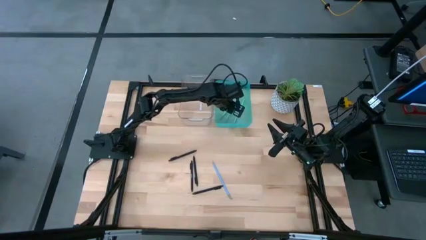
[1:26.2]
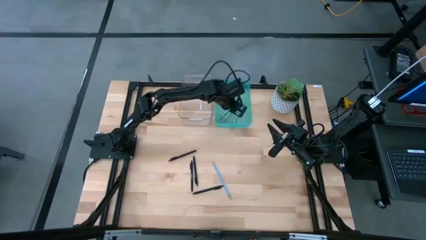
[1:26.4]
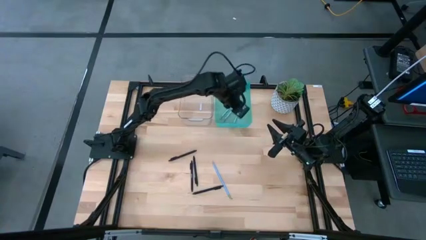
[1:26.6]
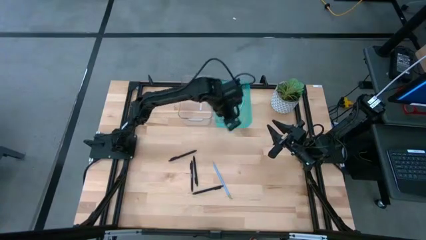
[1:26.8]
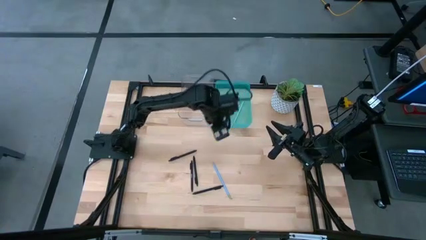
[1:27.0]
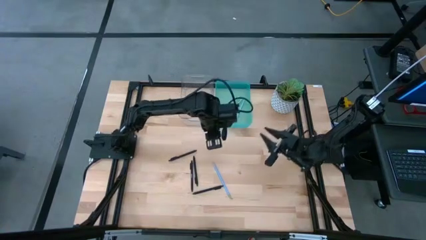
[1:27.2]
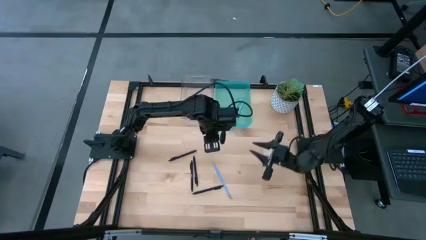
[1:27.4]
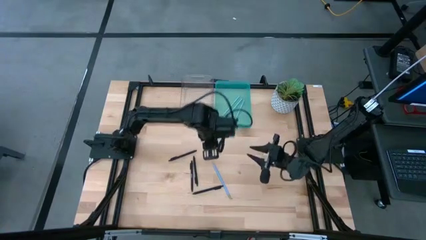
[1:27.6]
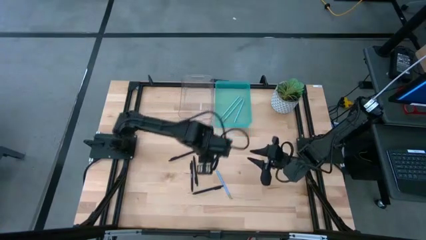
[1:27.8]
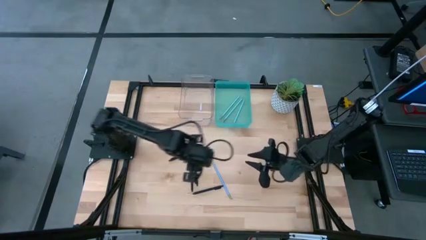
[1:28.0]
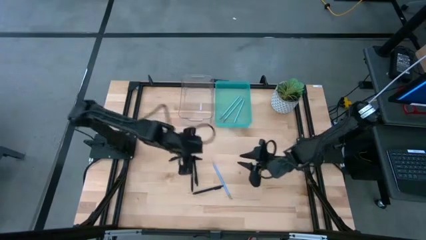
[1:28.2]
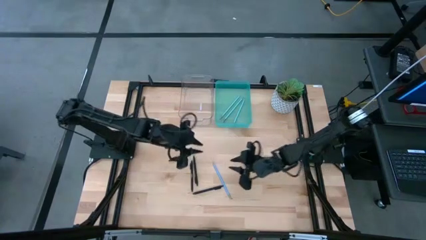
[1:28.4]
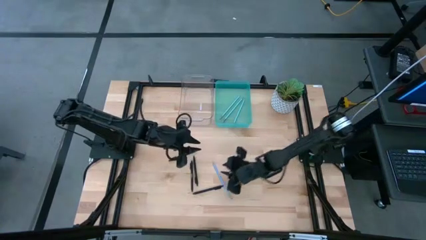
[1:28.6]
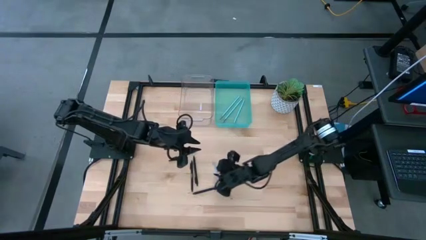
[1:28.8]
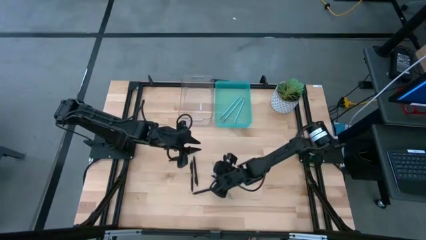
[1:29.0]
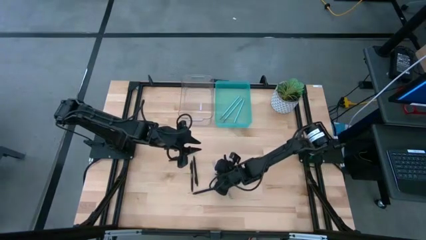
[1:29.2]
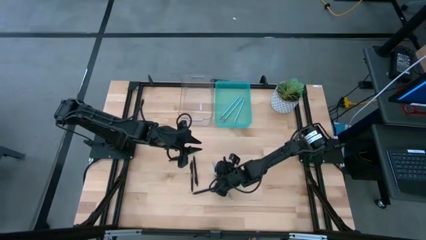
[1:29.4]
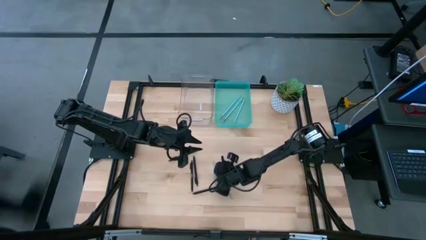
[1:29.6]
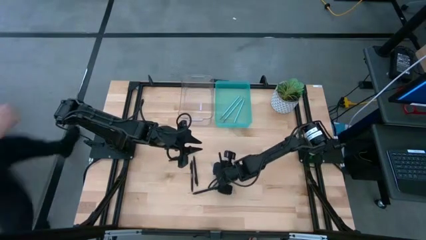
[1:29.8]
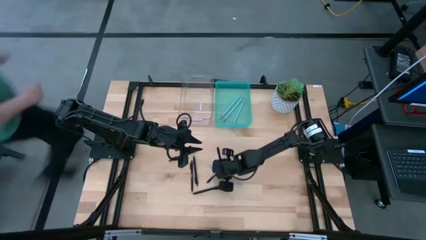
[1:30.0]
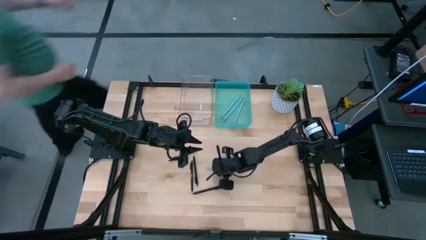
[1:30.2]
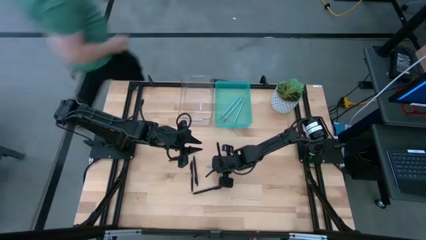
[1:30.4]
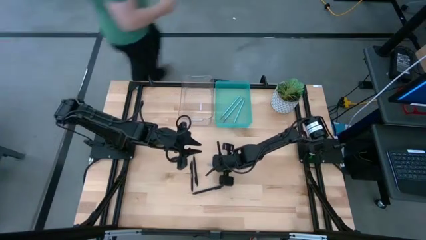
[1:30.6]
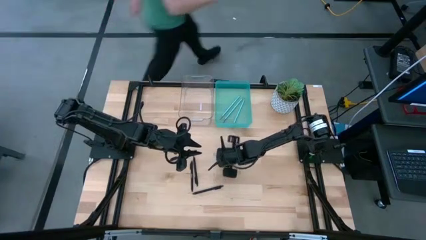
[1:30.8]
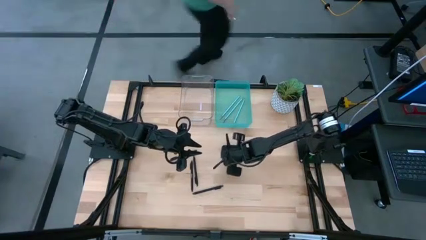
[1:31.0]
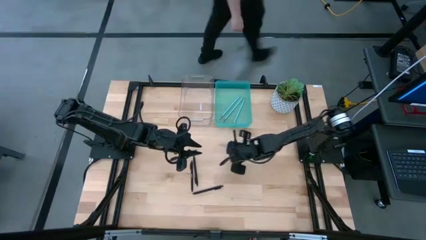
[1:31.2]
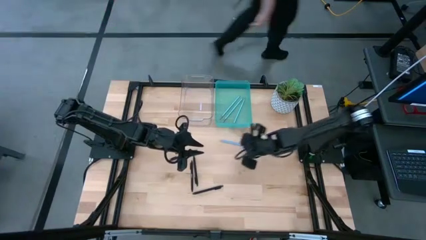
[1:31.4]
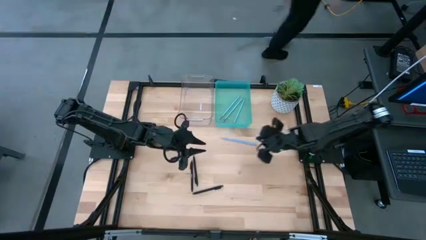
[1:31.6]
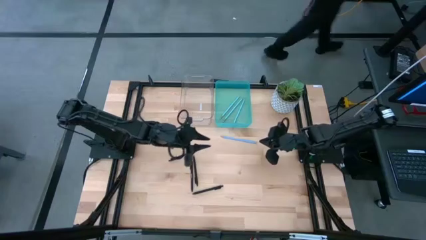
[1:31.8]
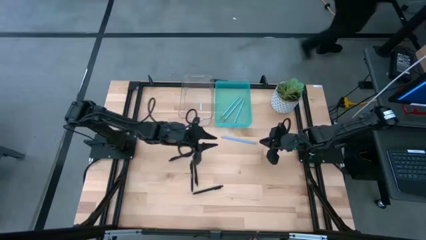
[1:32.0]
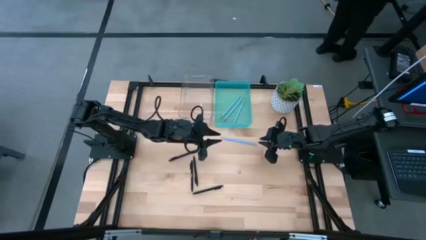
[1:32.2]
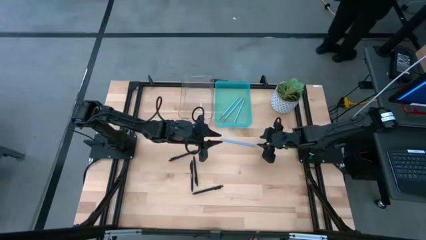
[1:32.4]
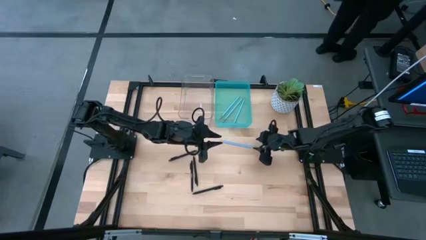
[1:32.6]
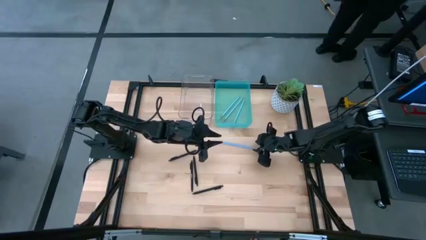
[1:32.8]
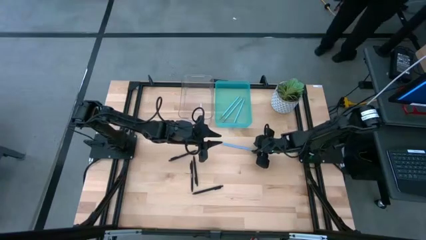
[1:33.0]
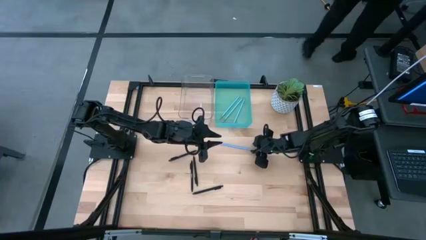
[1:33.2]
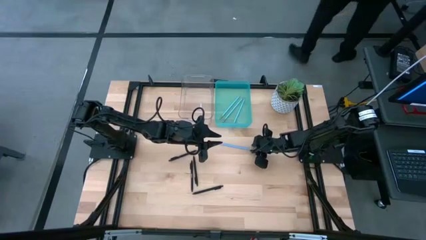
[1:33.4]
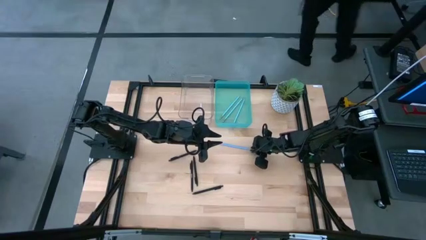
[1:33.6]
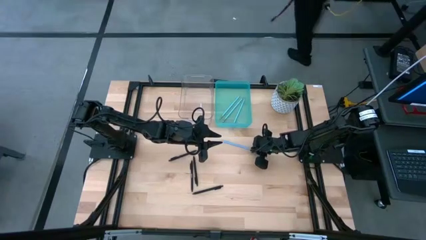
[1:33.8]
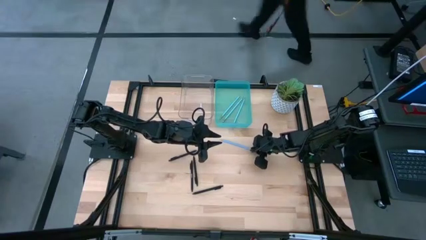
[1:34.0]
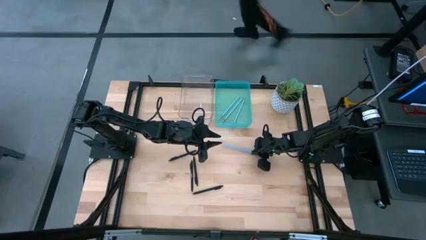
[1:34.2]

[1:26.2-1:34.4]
Task: Sort pens & pencils
Put the blue pencil into the light blue bin

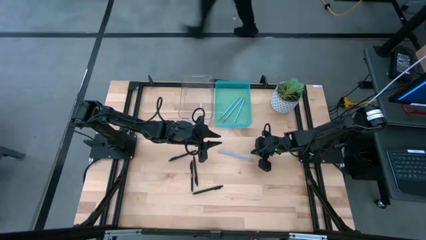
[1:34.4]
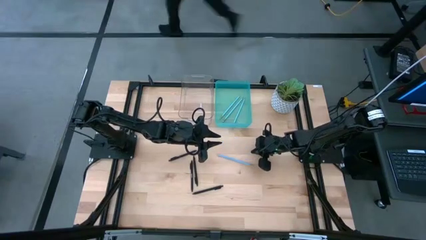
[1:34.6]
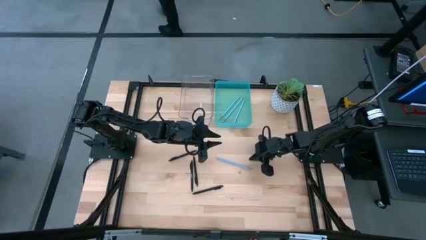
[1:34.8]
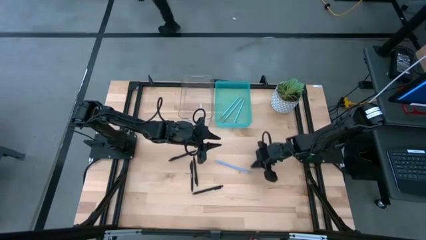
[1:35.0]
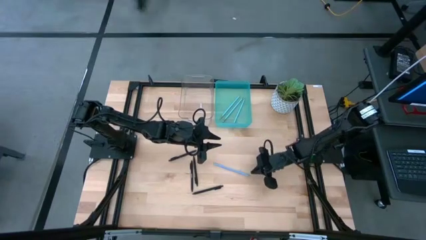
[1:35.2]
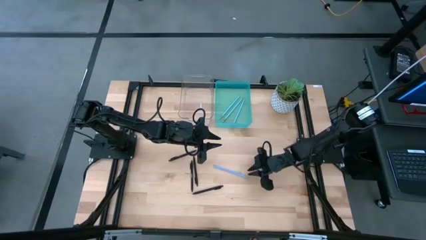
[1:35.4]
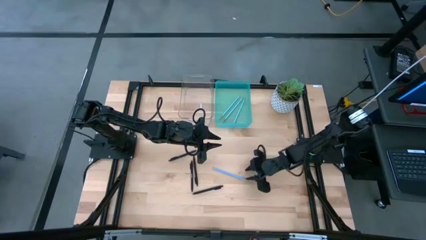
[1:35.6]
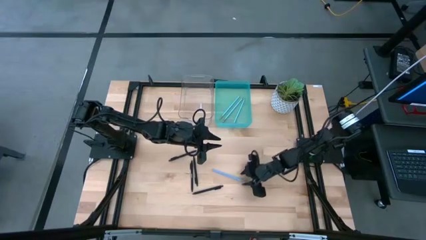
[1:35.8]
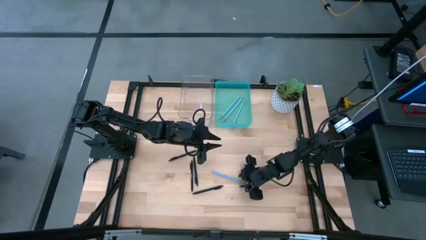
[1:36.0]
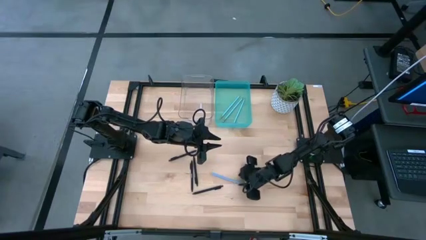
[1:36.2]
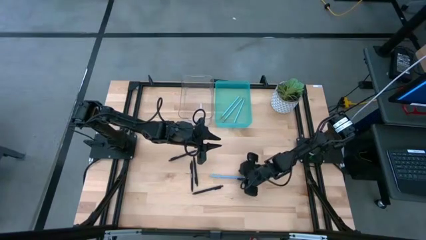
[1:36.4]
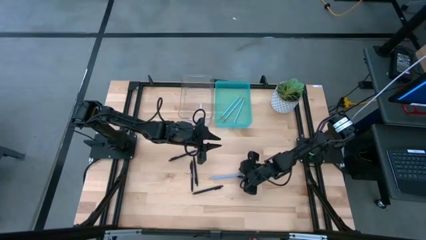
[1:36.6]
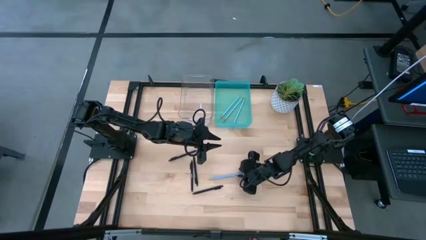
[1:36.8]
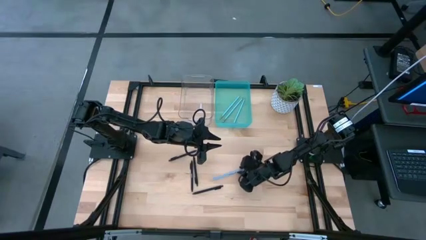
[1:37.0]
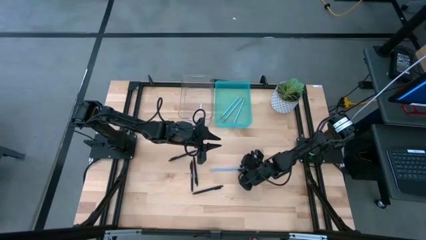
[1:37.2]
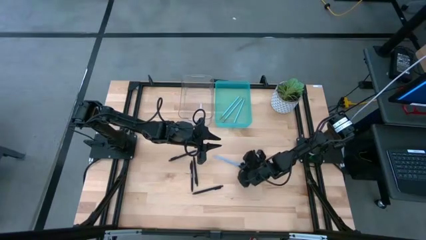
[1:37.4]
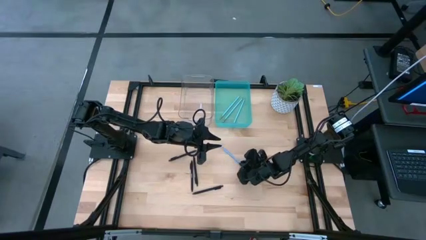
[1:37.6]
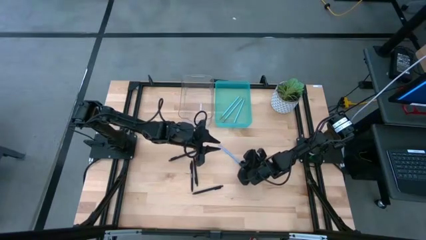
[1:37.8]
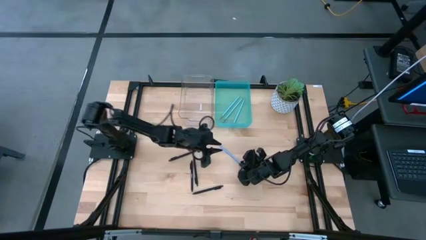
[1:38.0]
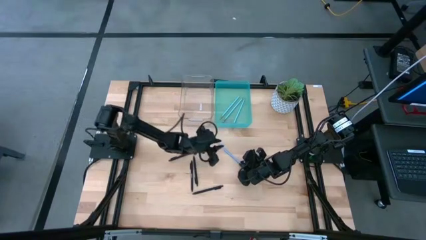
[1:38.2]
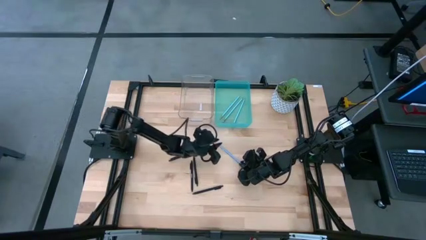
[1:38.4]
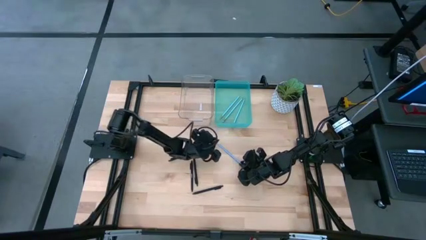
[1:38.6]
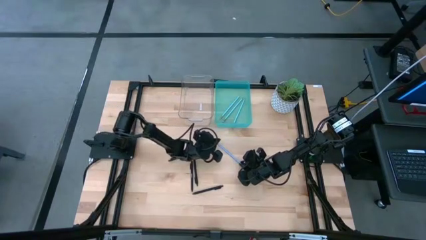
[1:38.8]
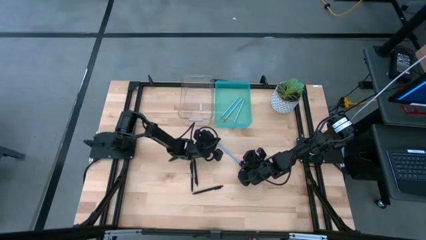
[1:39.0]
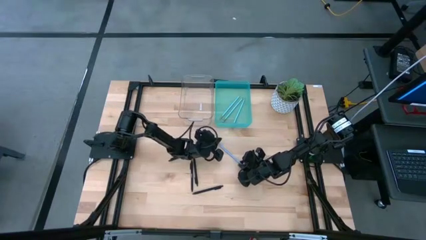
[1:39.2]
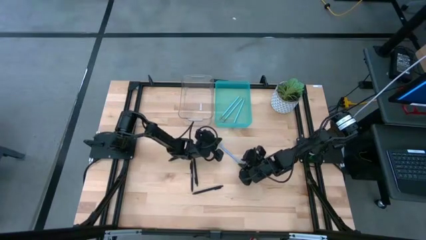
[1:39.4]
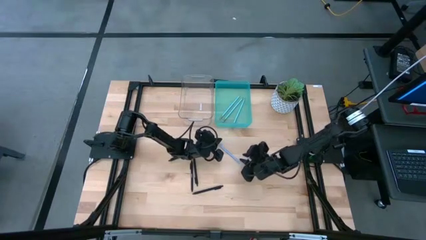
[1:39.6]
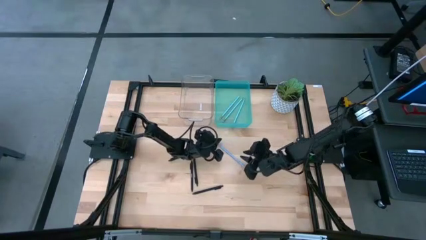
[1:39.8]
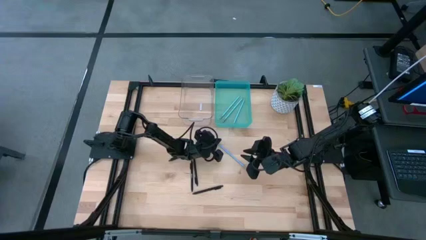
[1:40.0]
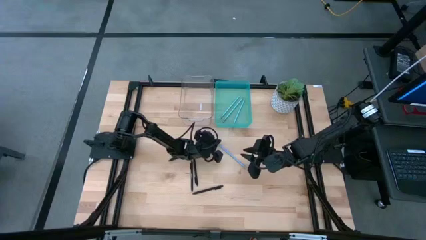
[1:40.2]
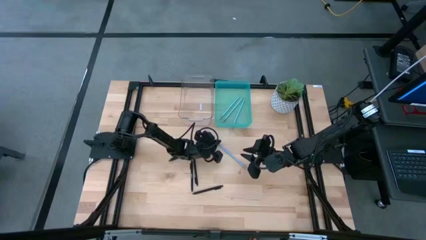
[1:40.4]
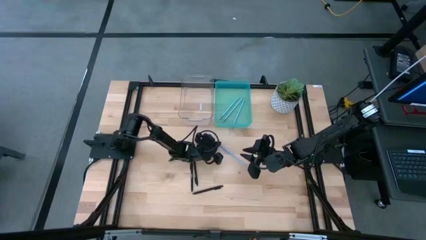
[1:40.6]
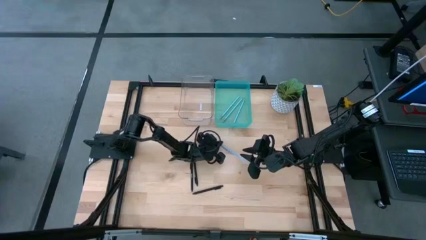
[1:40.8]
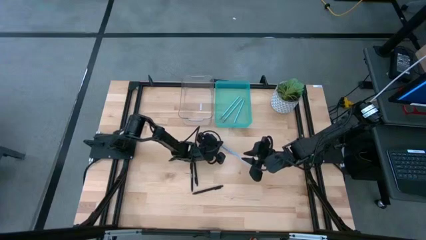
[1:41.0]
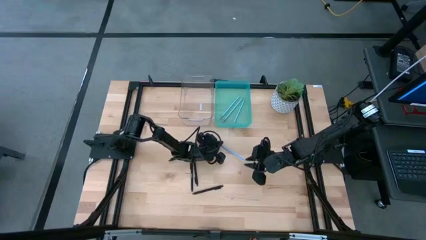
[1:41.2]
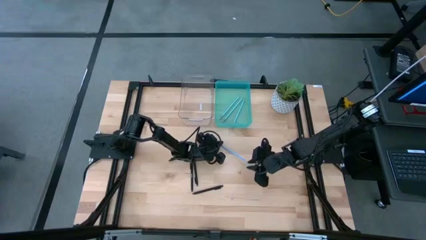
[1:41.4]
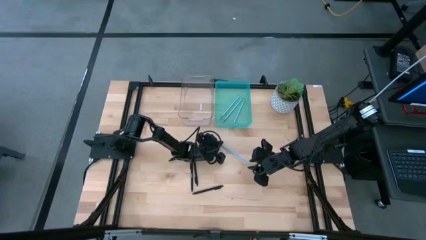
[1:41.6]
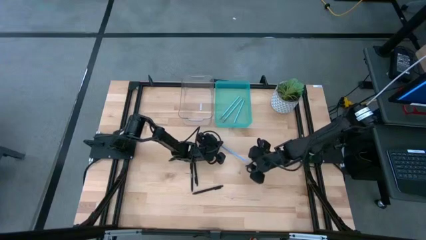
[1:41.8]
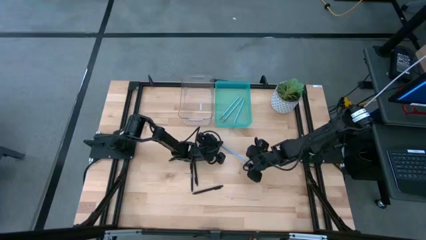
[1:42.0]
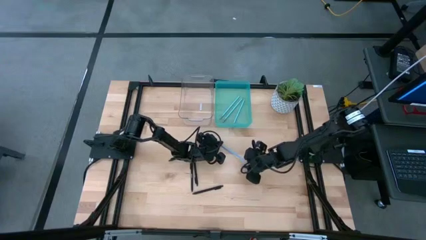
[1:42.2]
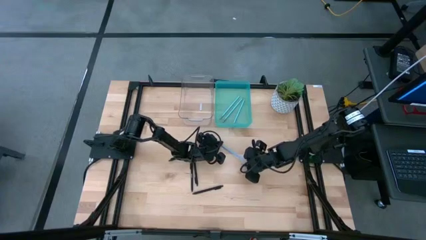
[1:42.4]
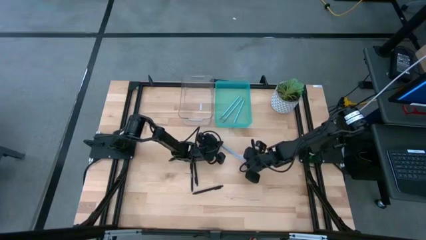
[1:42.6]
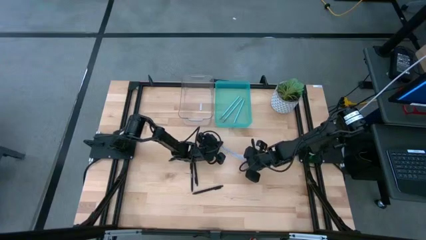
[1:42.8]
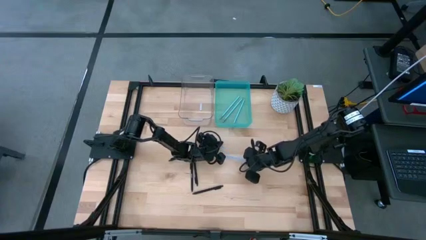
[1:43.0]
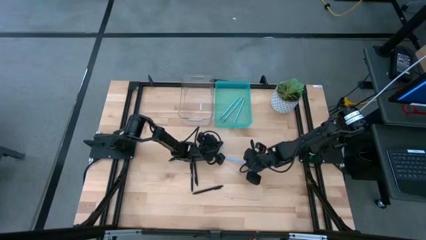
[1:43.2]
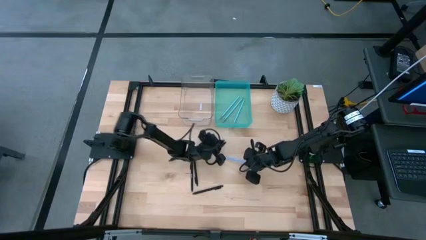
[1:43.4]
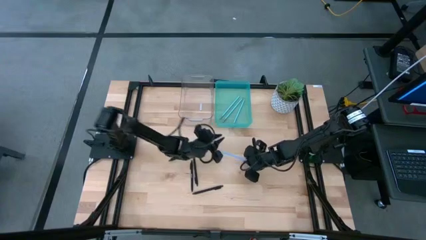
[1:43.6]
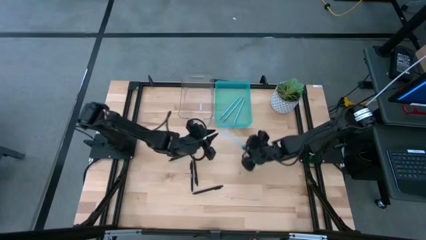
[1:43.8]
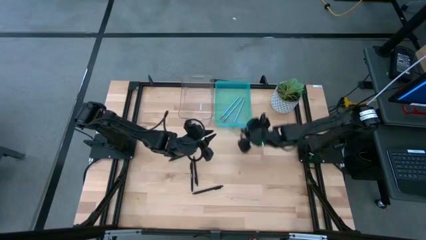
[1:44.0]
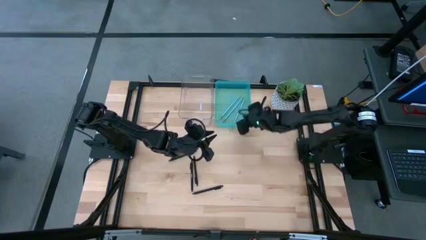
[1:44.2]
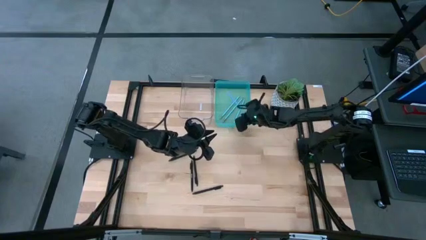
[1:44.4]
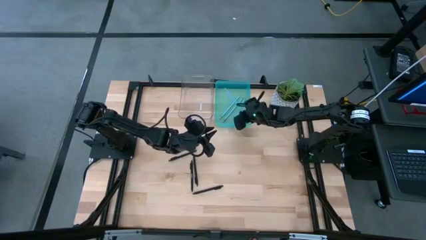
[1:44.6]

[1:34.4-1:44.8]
Put the blue pencil into the light blue bin
